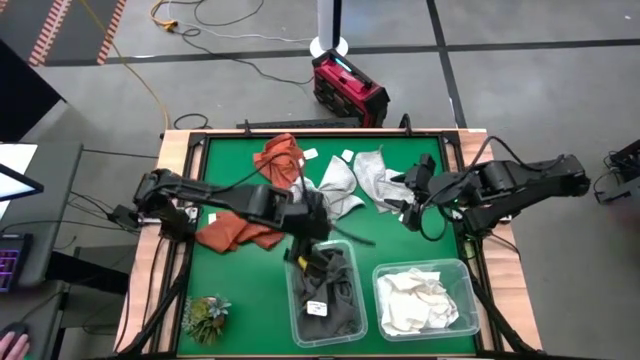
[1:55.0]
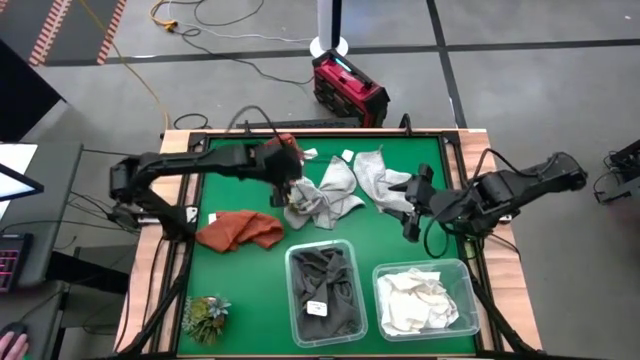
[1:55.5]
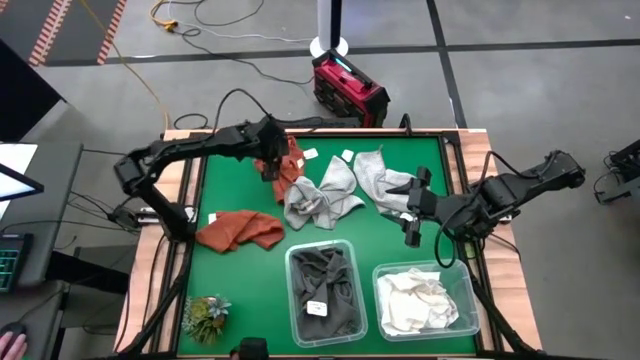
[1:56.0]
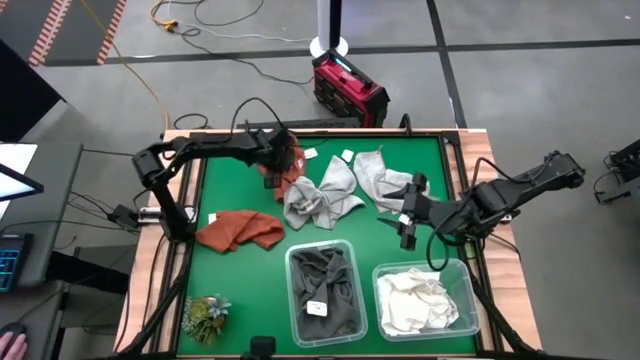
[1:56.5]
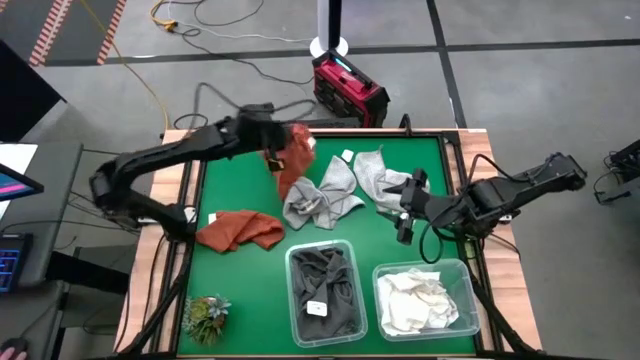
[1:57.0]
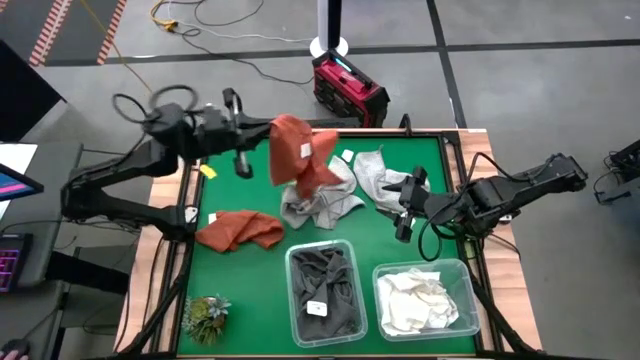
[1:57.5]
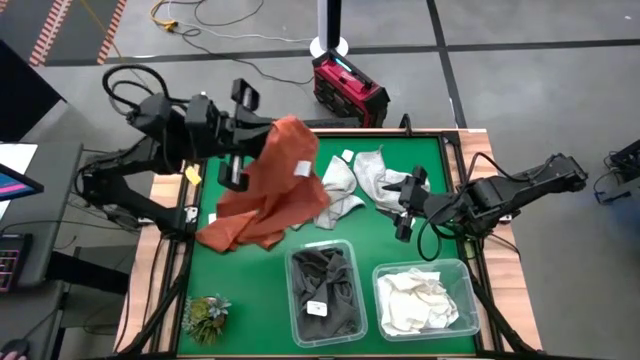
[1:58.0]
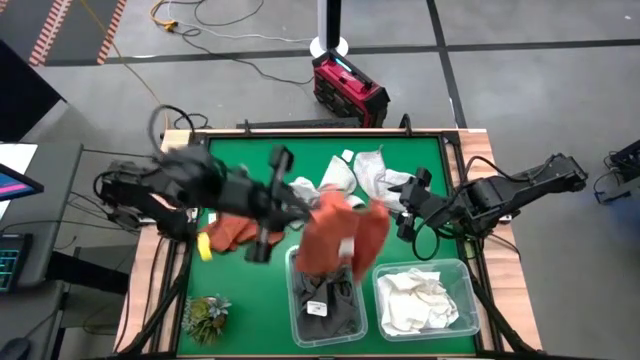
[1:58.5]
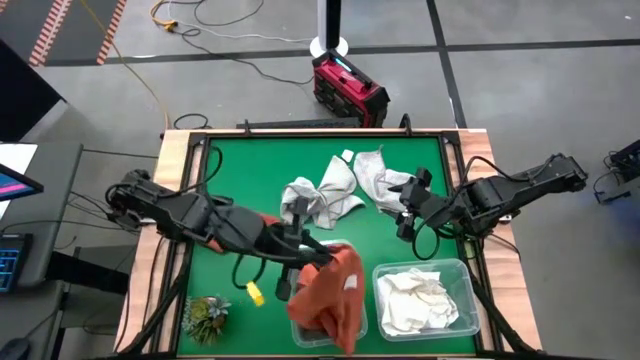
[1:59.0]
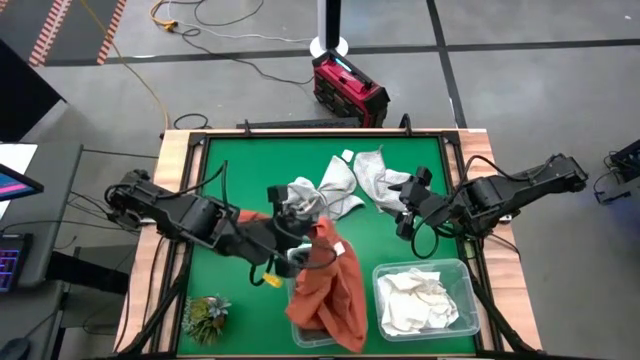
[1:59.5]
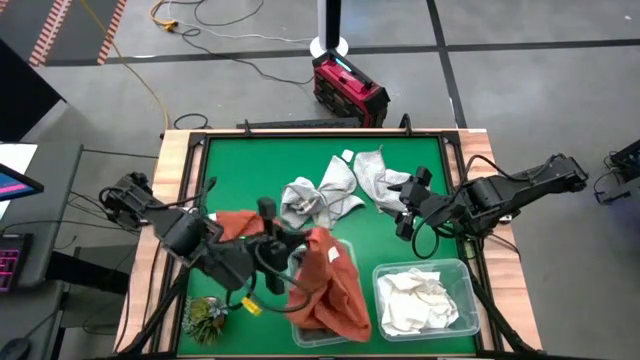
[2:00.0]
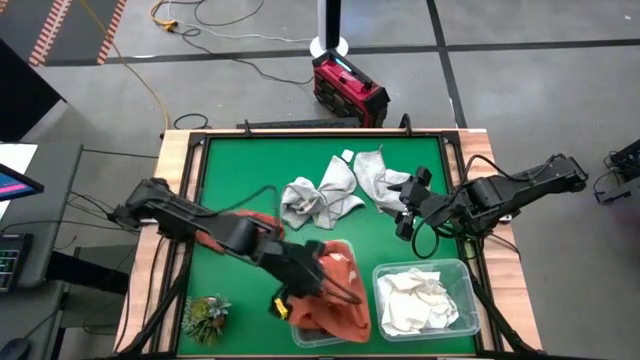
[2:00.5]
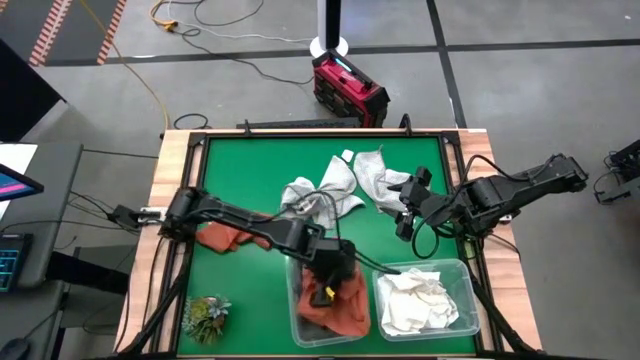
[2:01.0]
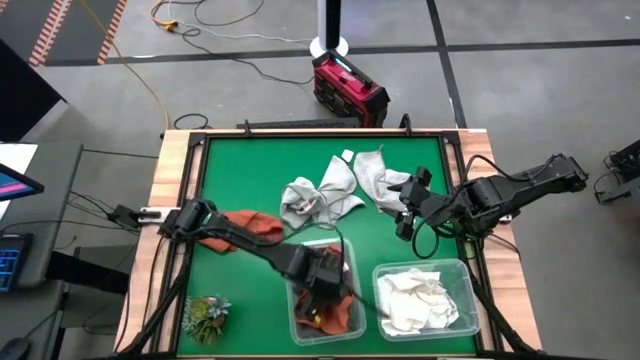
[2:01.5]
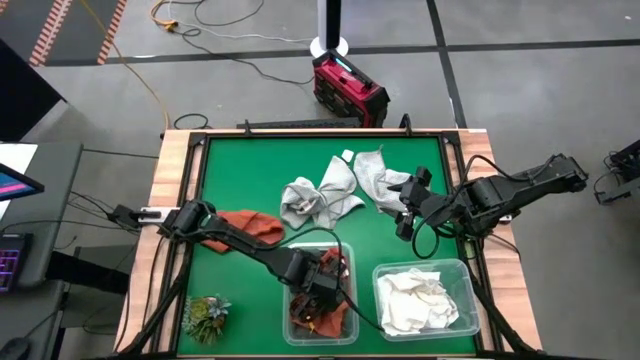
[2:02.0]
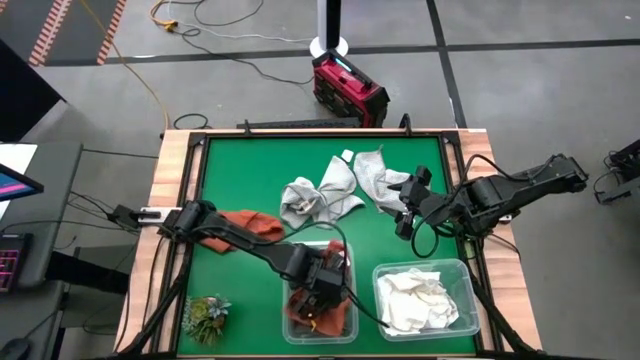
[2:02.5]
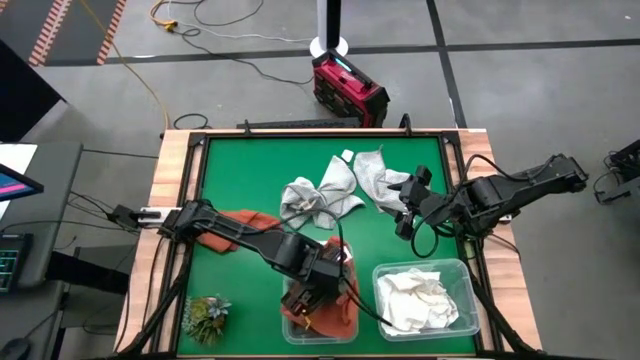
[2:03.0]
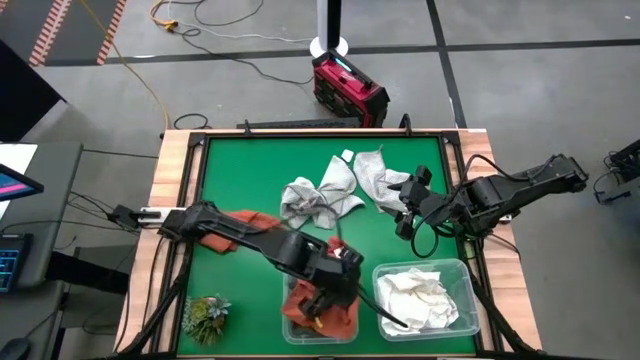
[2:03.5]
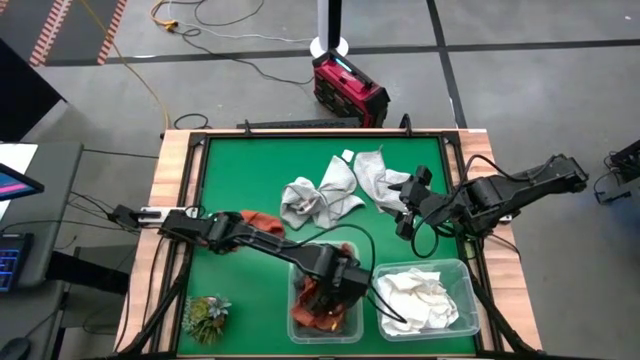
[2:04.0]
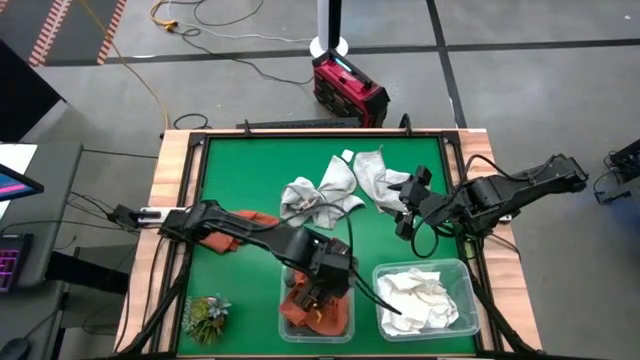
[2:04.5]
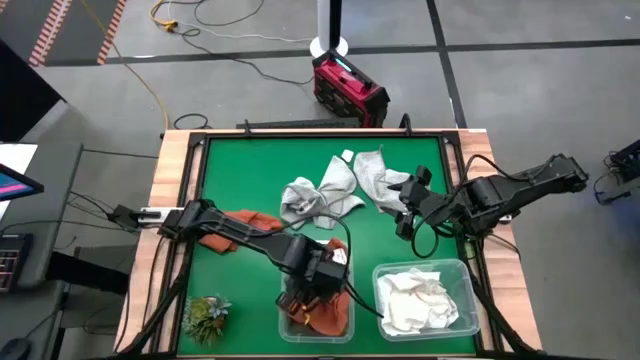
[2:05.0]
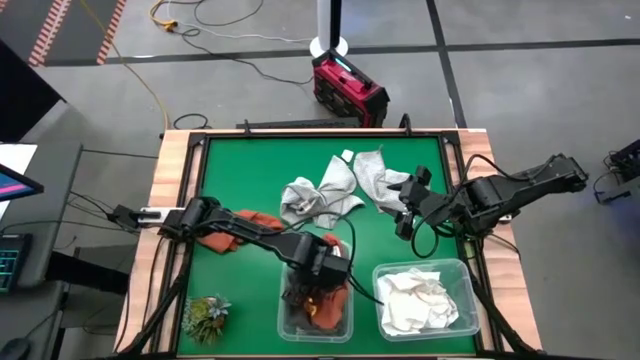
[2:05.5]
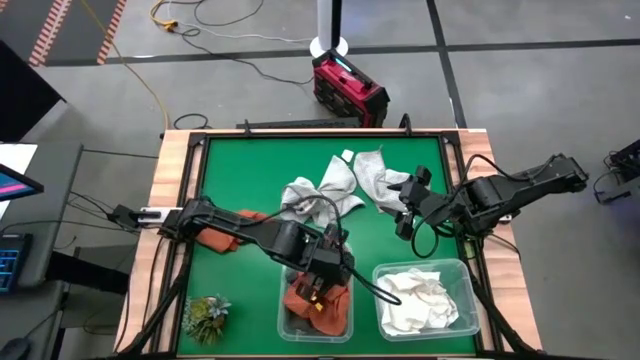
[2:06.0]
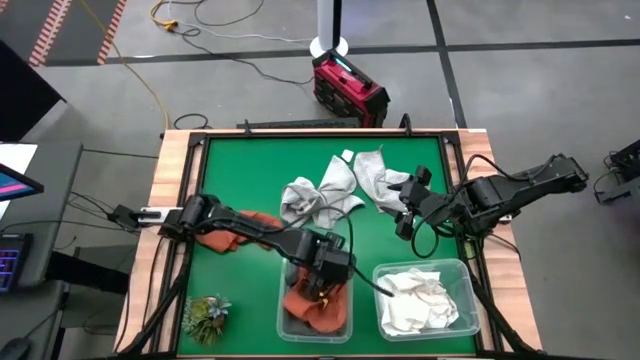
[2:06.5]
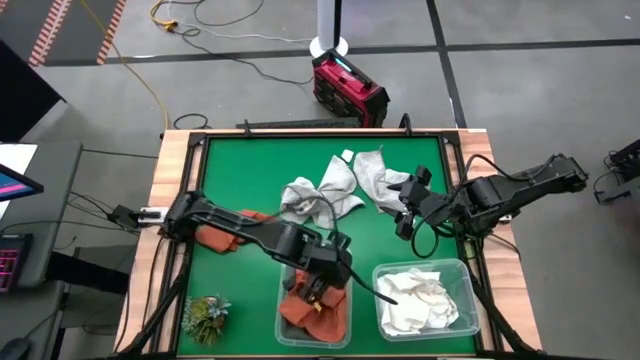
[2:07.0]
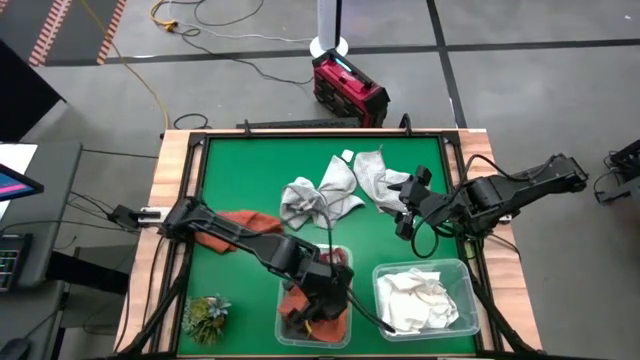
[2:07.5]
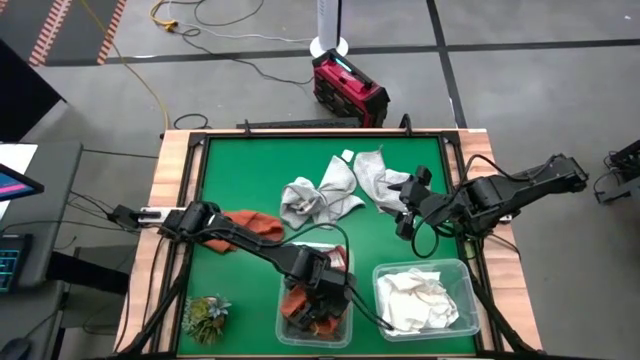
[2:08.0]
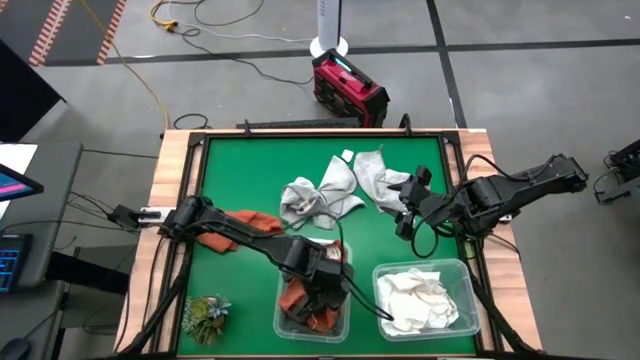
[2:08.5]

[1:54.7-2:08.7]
Task: Sort towels by color in basket
Put the top orange towel into the left transparent bin

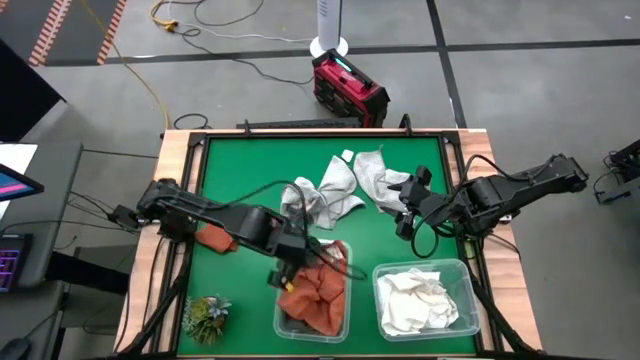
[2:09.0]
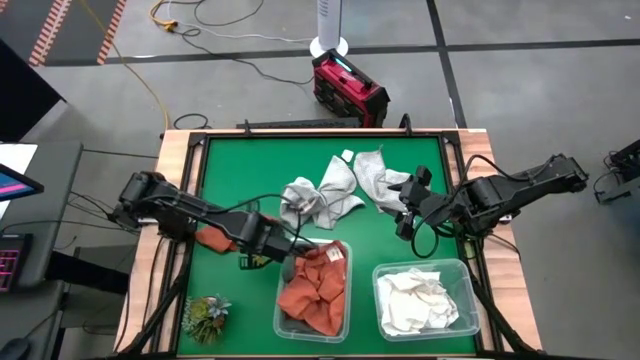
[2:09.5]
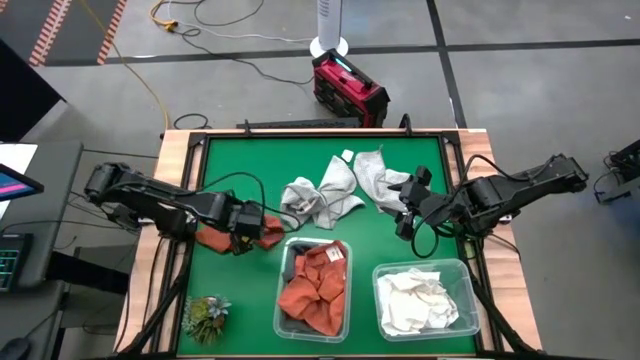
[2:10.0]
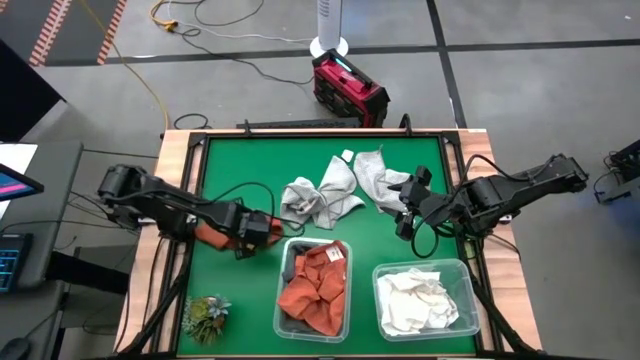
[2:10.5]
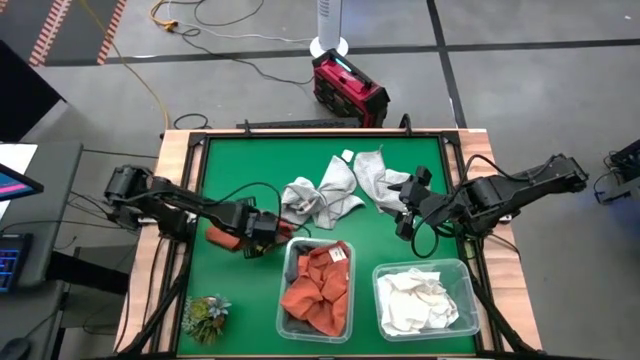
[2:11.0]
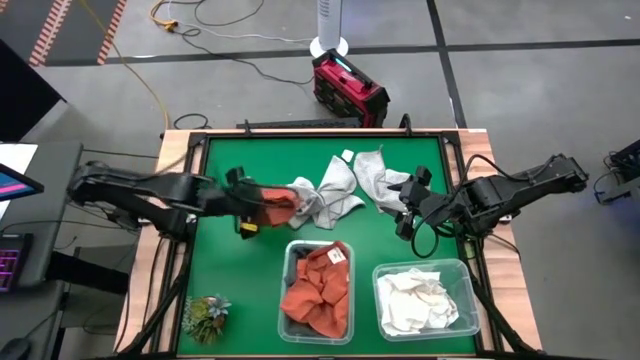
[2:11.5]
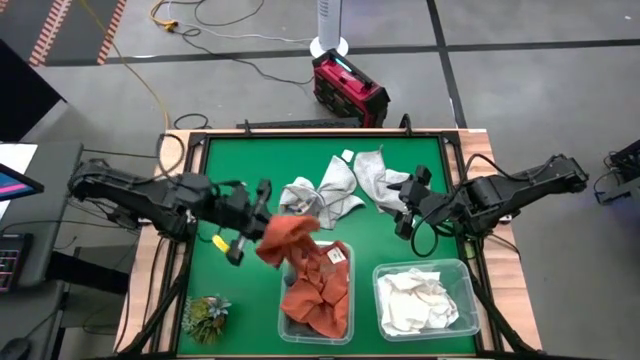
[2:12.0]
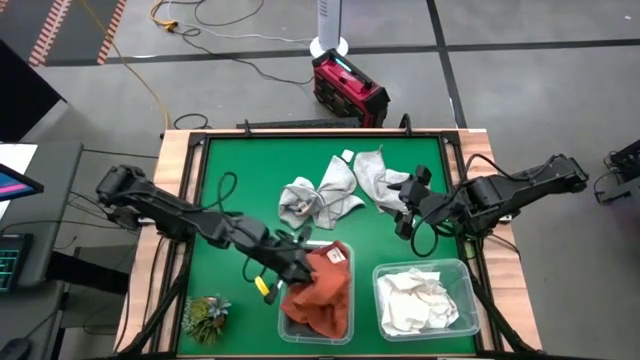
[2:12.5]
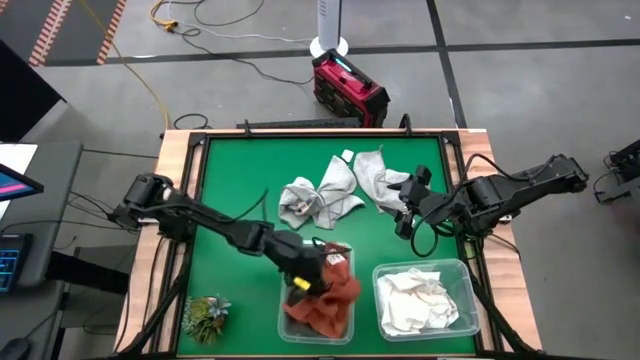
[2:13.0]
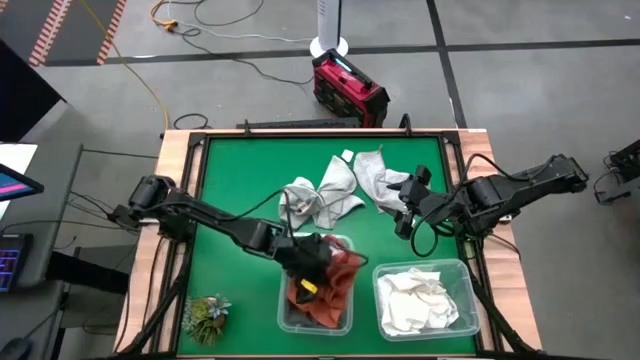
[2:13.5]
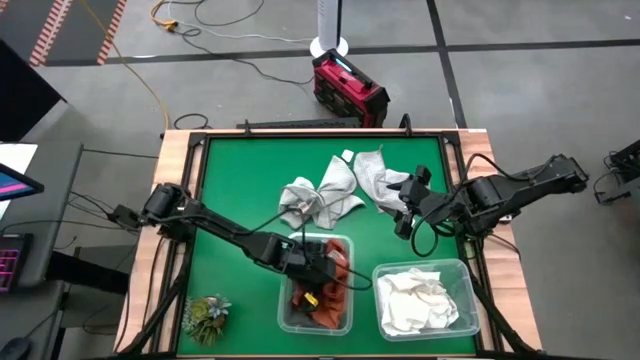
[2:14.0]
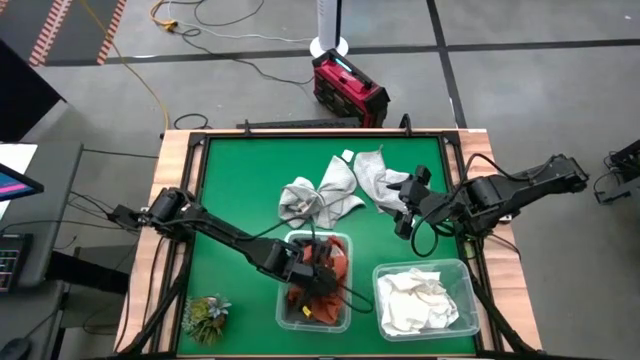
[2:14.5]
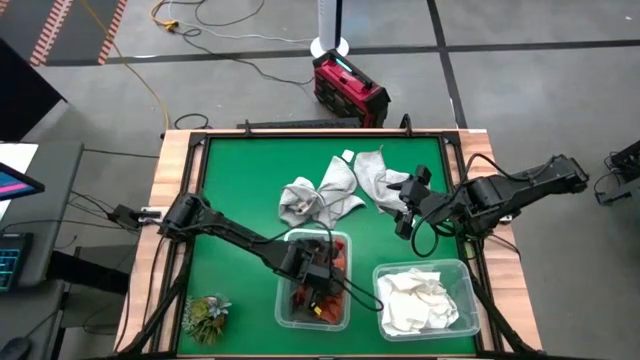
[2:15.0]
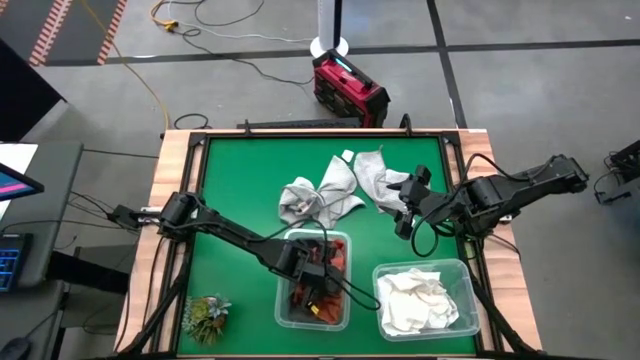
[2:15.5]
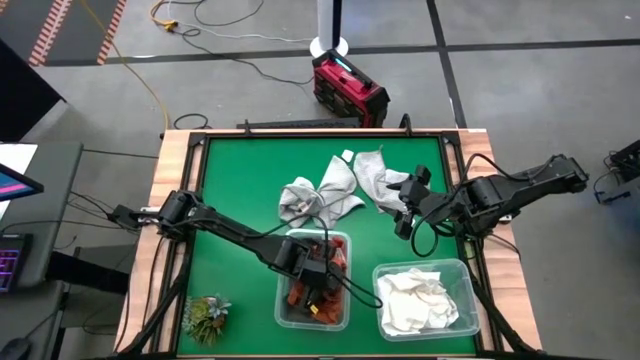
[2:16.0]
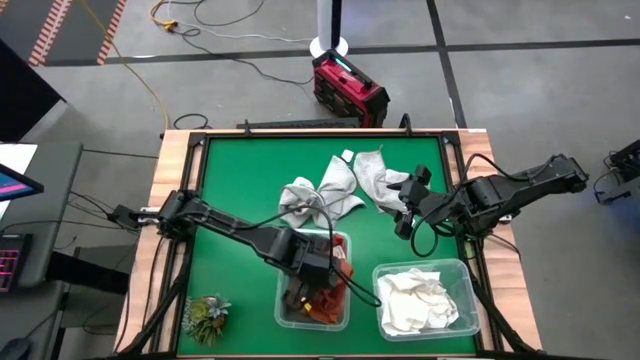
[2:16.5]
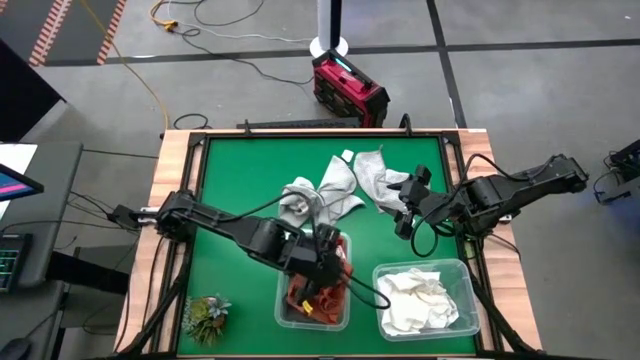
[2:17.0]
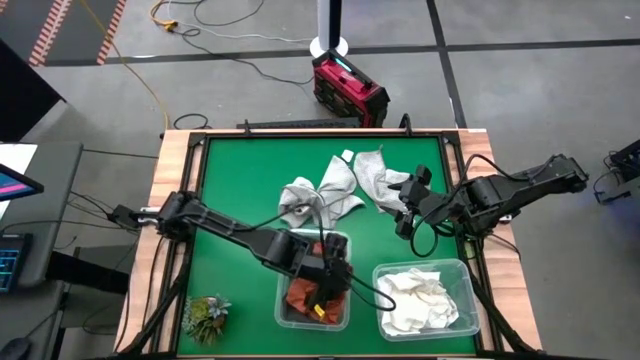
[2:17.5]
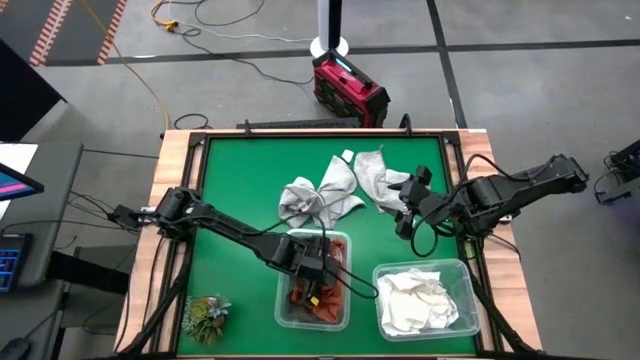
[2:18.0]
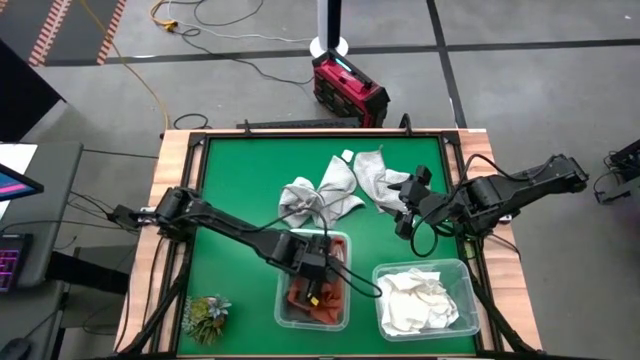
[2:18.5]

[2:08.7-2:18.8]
Put the orange towel into the left transparent bin
